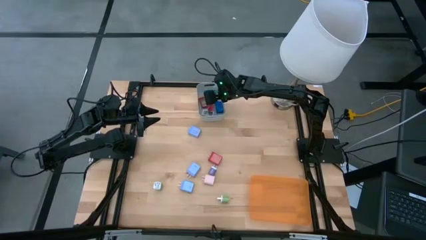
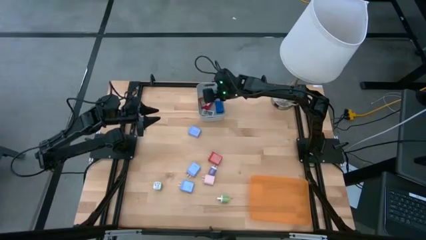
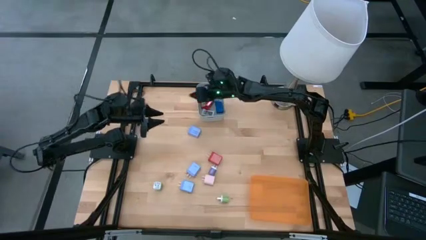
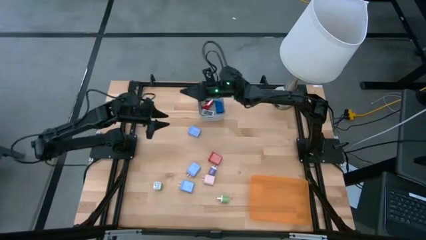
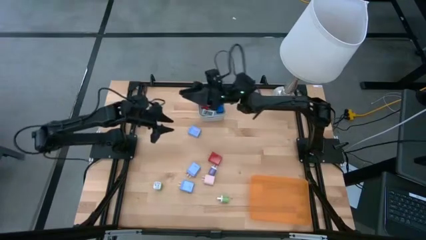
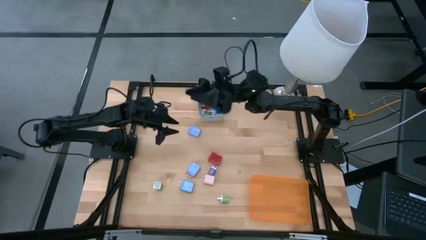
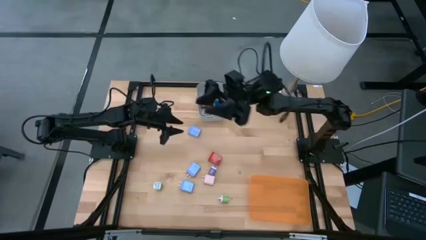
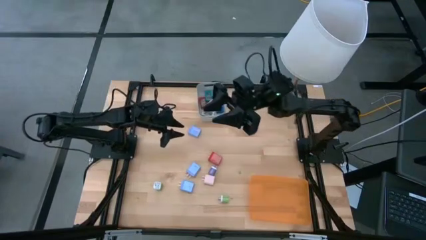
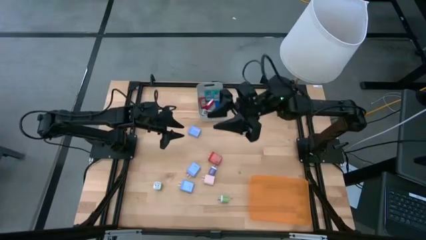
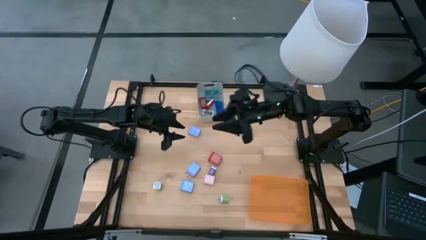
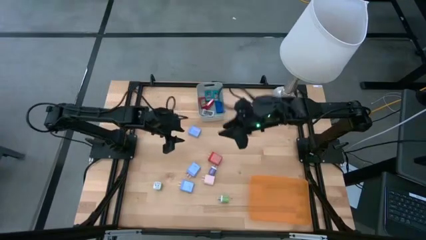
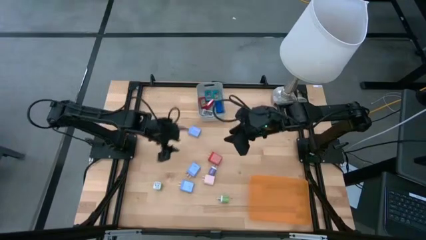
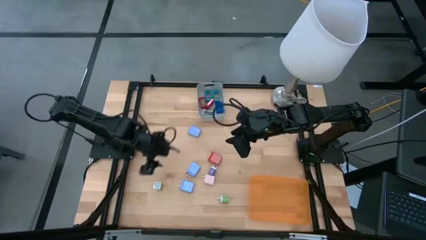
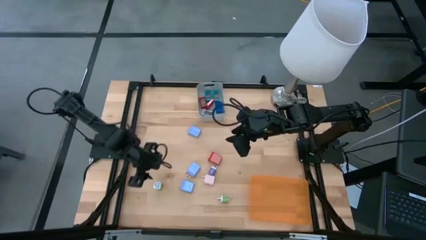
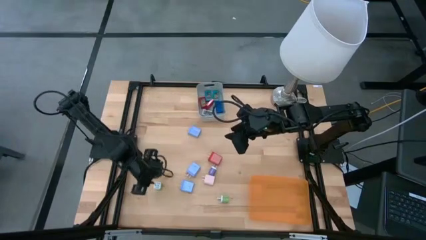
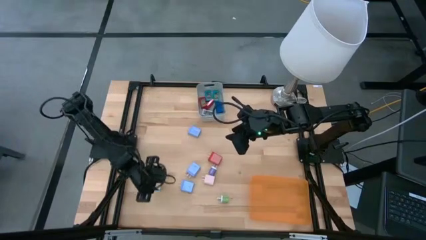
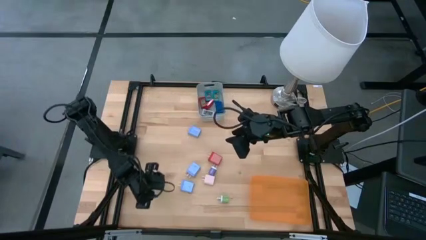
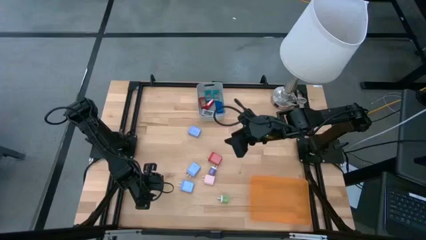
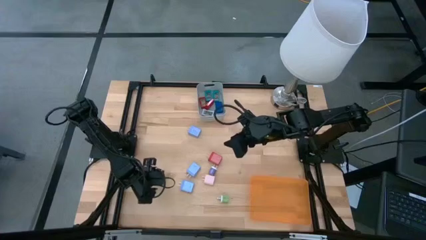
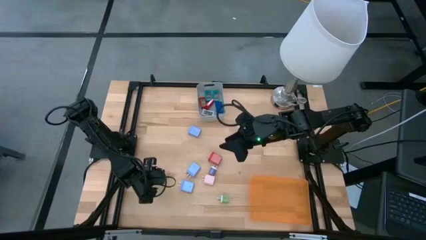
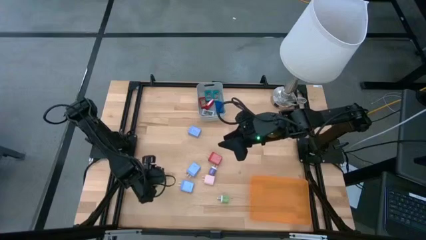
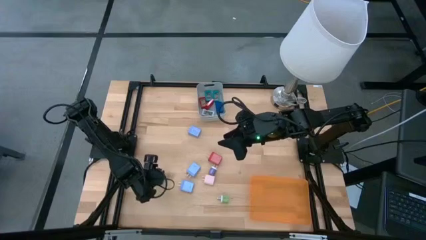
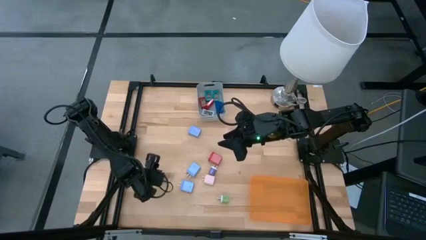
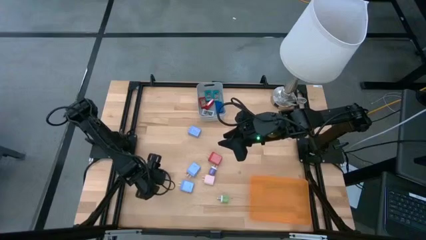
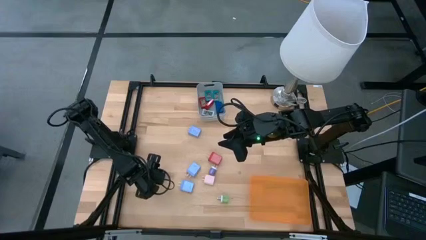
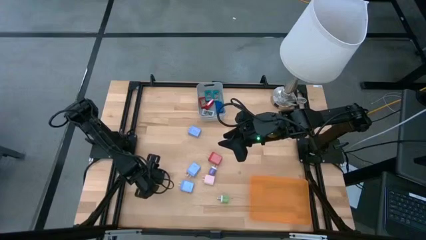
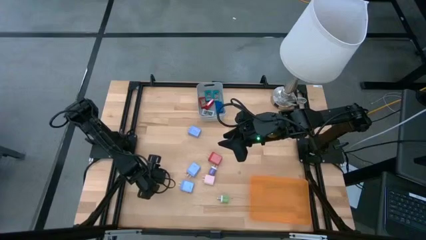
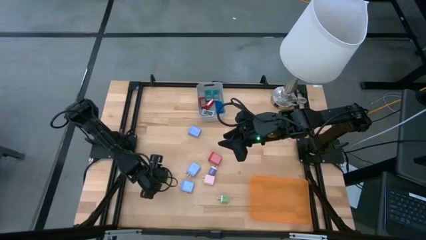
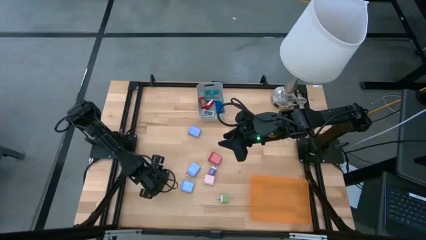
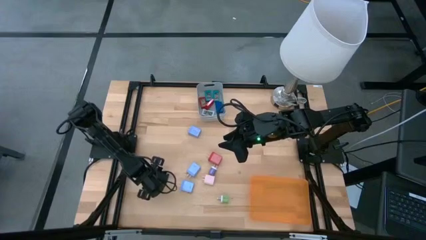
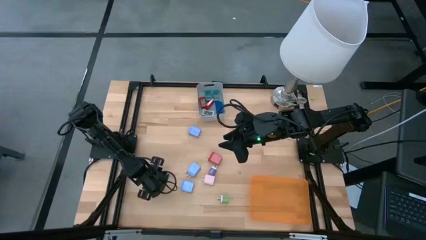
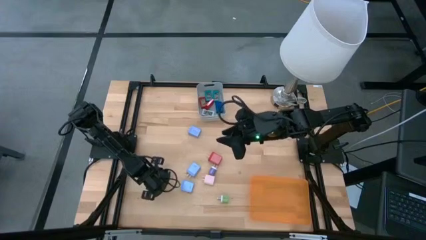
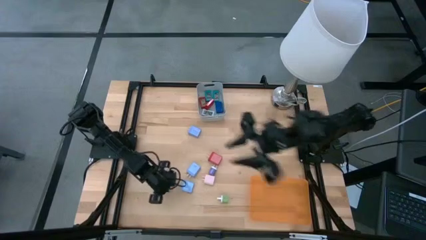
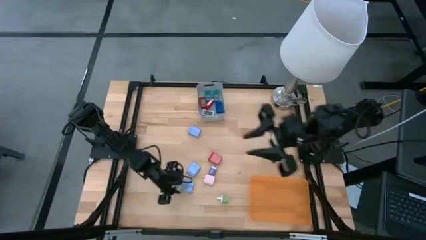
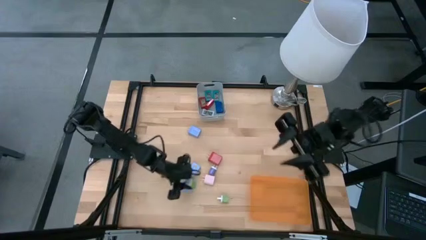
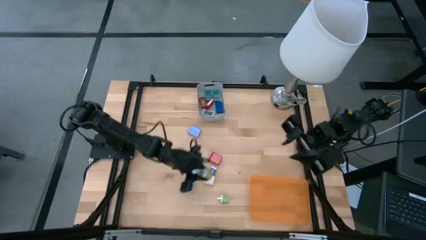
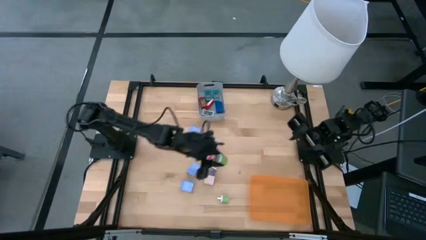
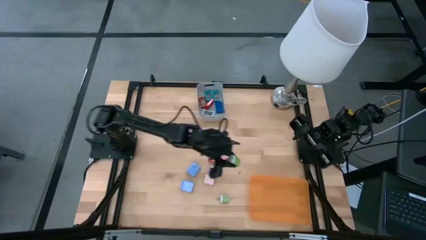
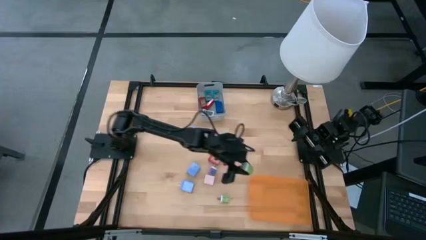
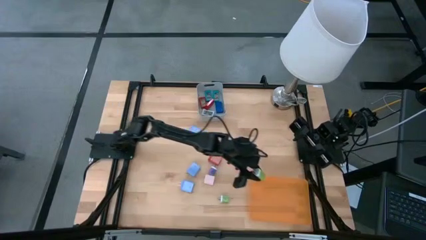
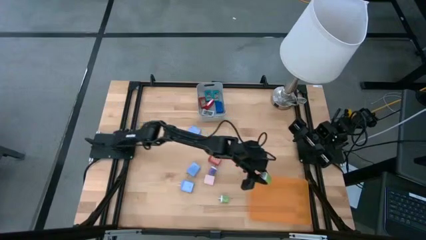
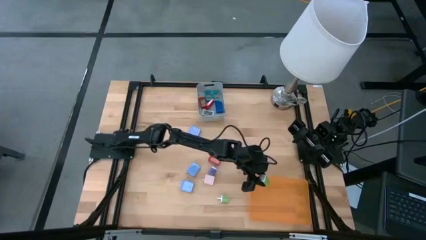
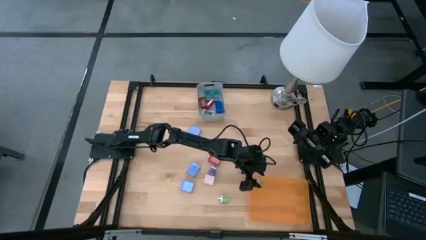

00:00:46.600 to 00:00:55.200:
Task: Pick & Place Office items
Put the left green charger adapter into the orange bin

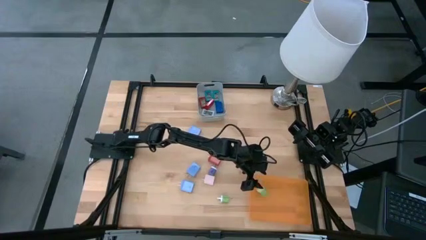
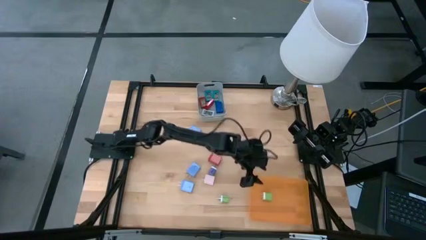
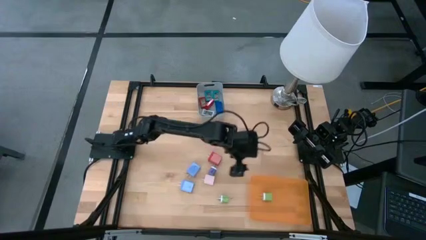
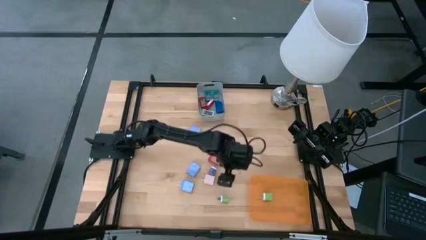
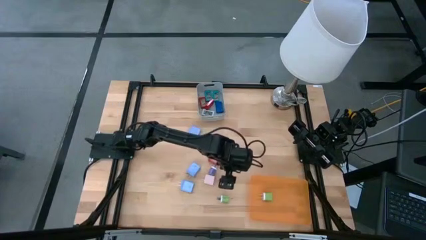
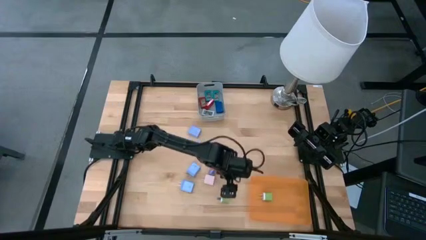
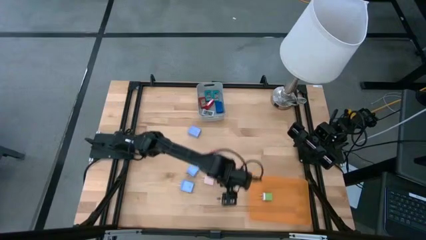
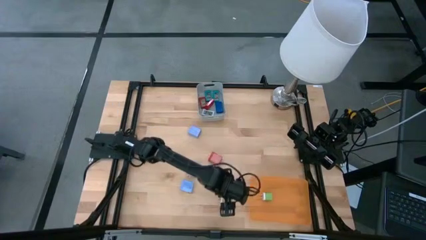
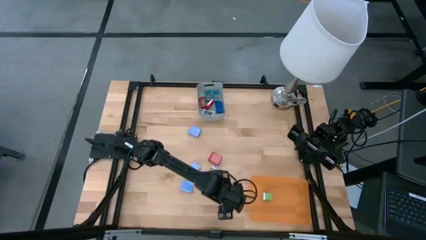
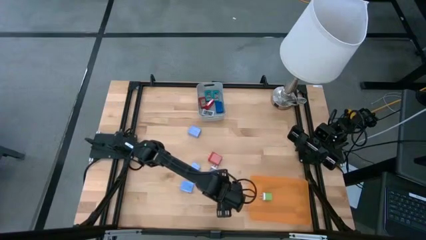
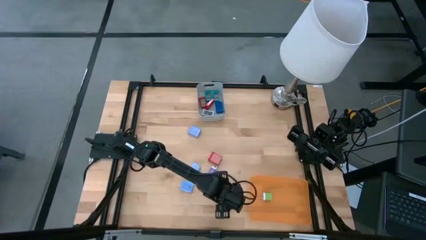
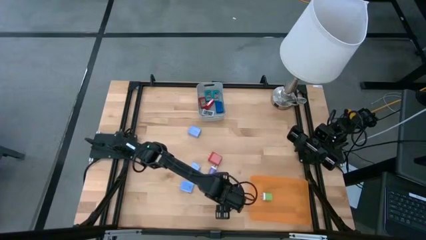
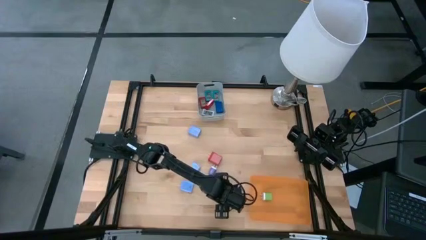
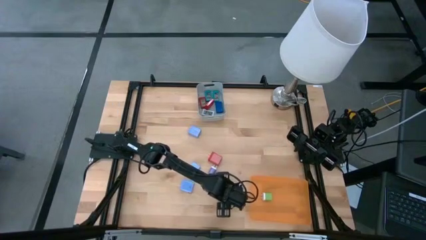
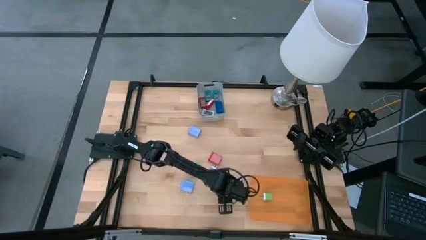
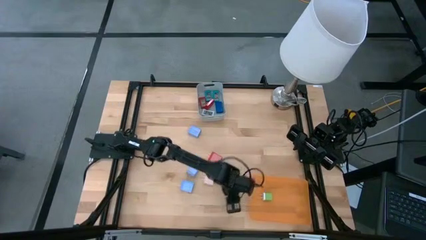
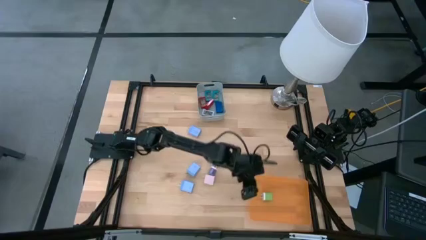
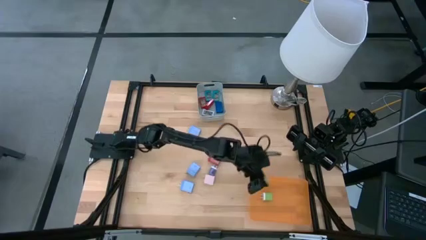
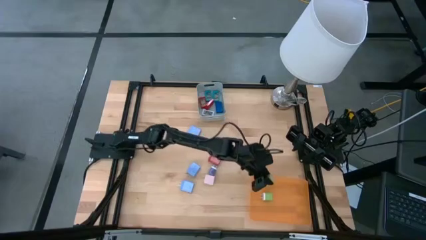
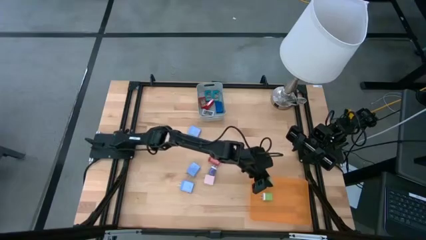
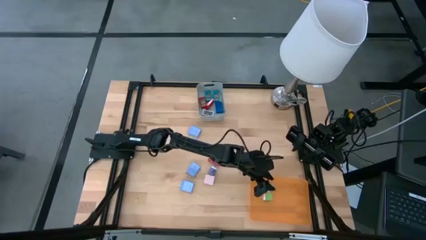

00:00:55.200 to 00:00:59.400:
Put the green charger adapter into the orange bin

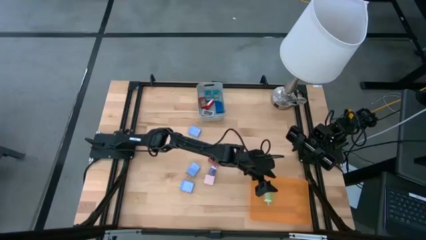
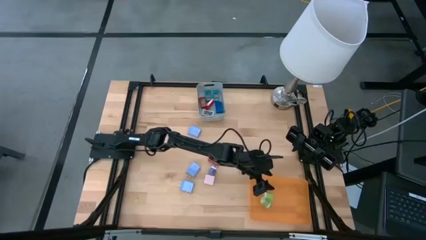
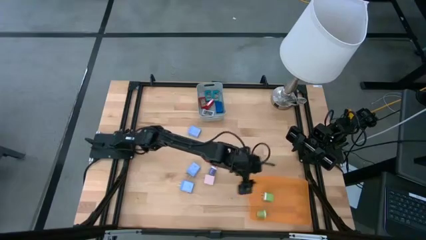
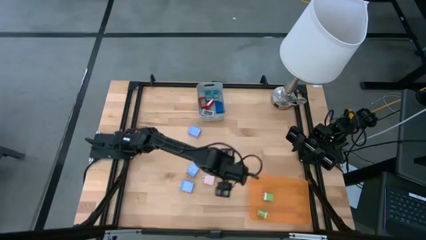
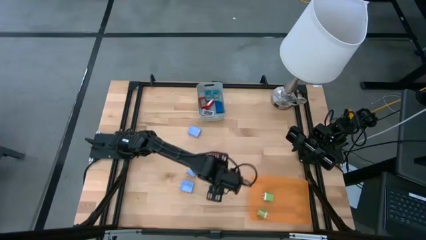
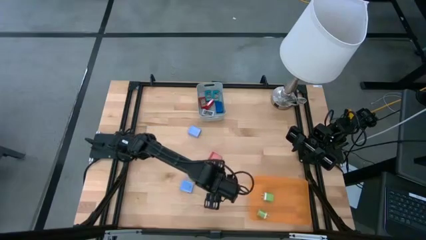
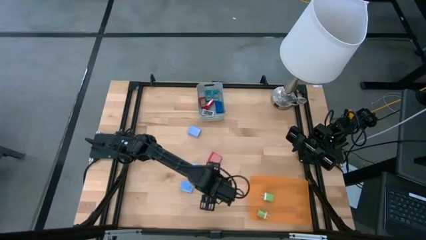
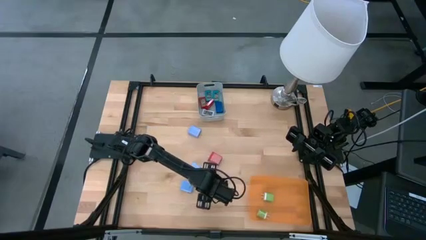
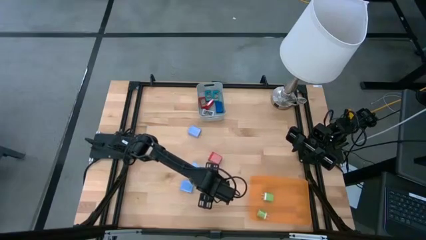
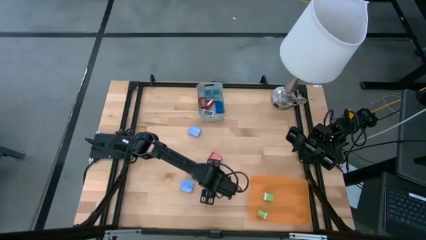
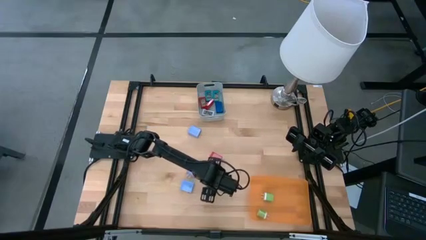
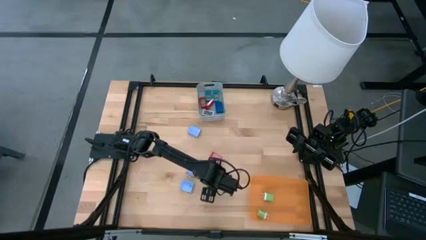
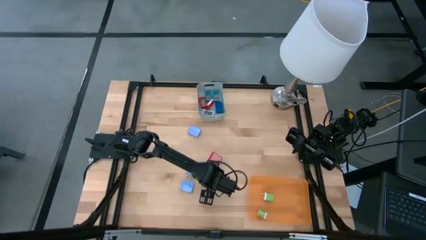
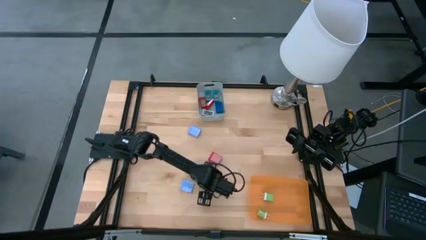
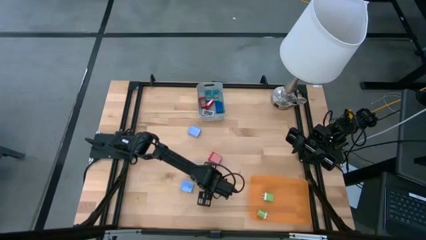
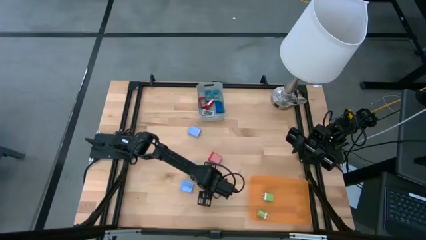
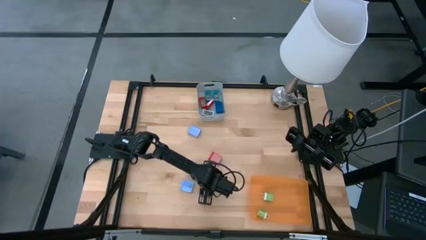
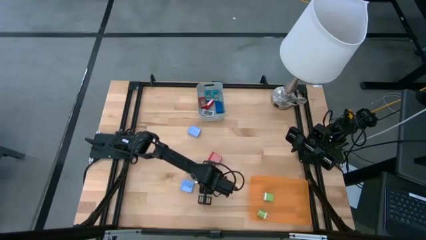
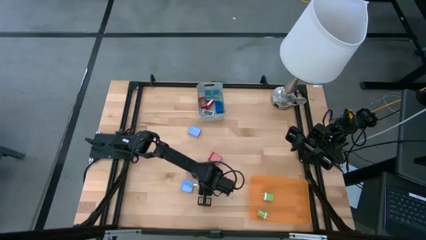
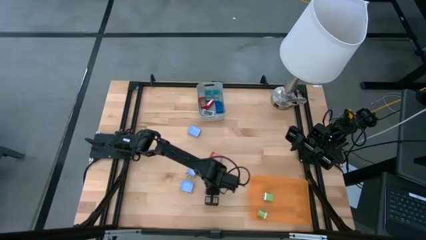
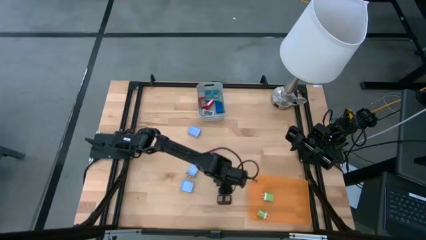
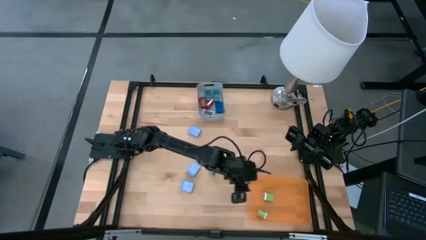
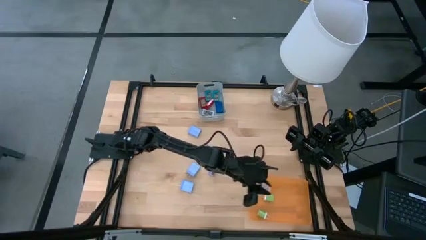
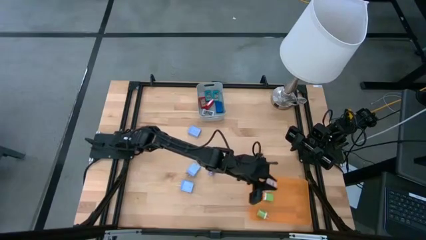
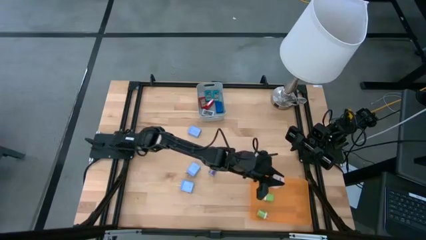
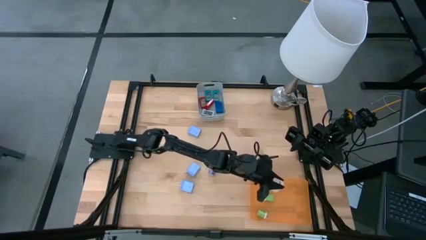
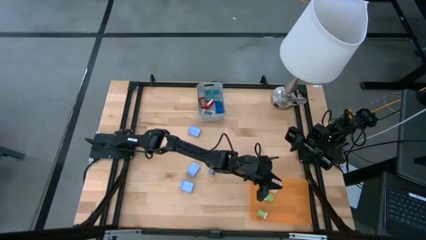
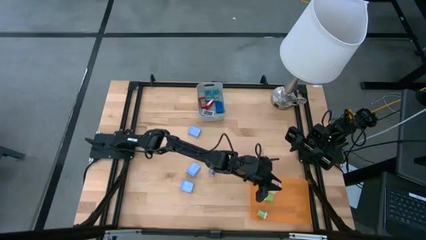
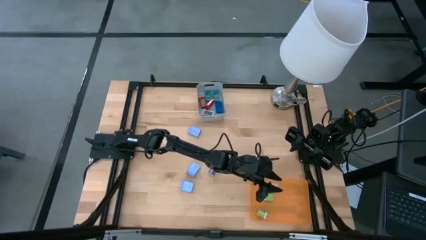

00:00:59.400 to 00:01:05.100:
Put the pink charger adapter into the orange bin
